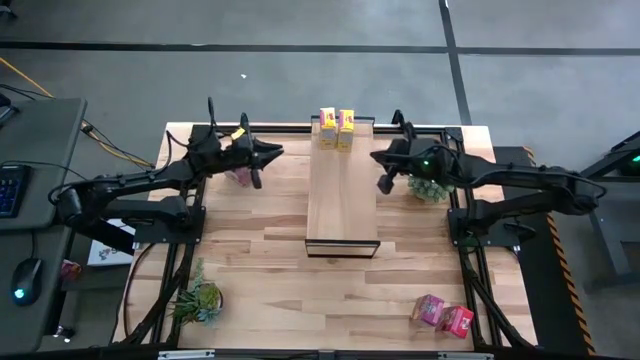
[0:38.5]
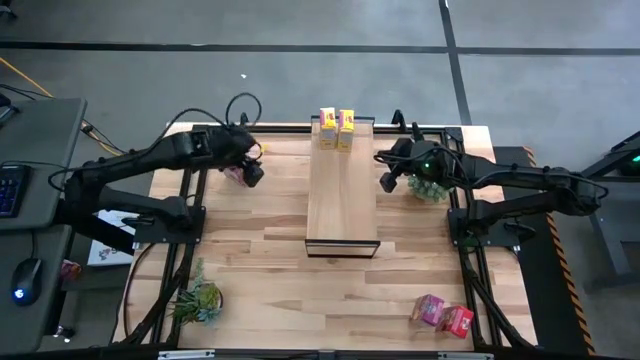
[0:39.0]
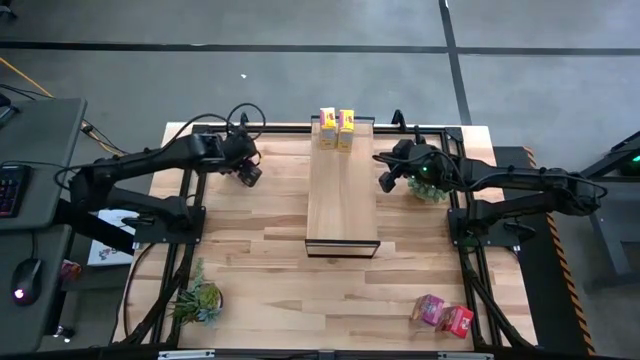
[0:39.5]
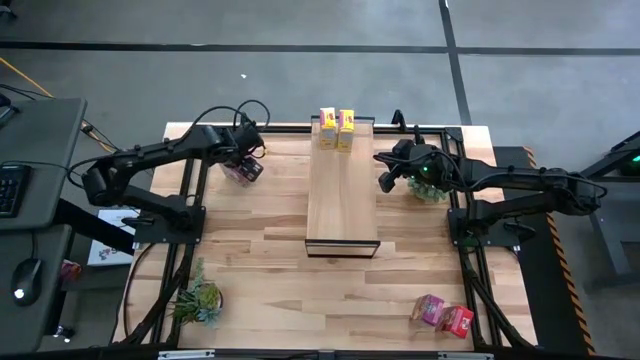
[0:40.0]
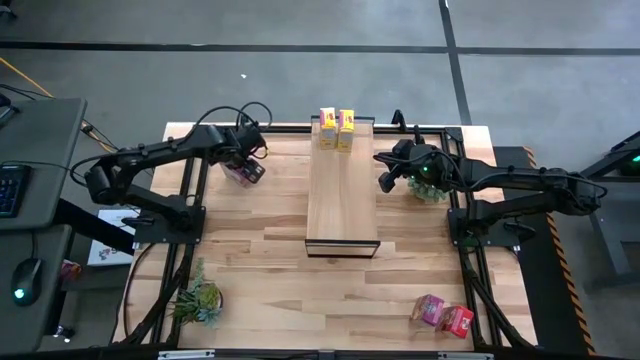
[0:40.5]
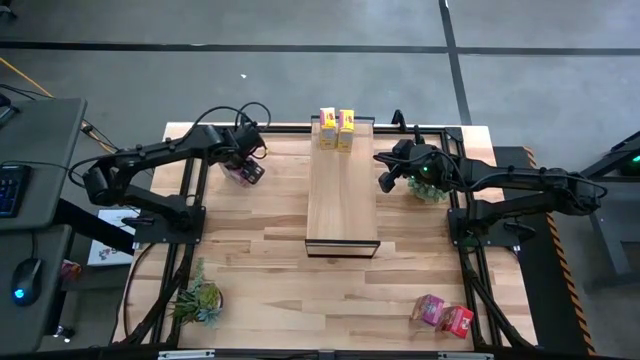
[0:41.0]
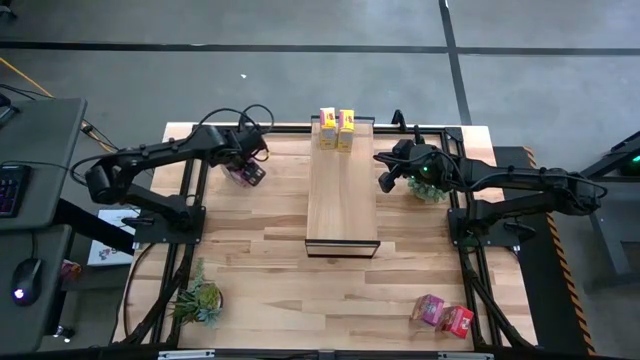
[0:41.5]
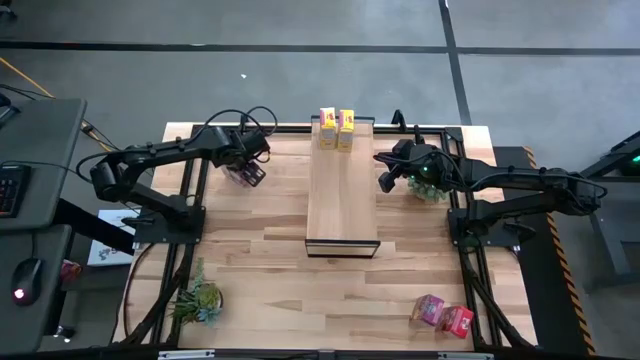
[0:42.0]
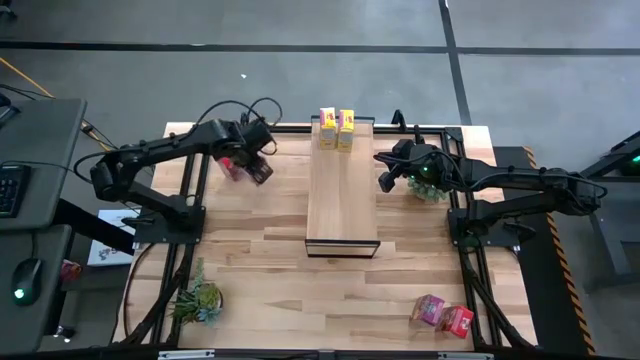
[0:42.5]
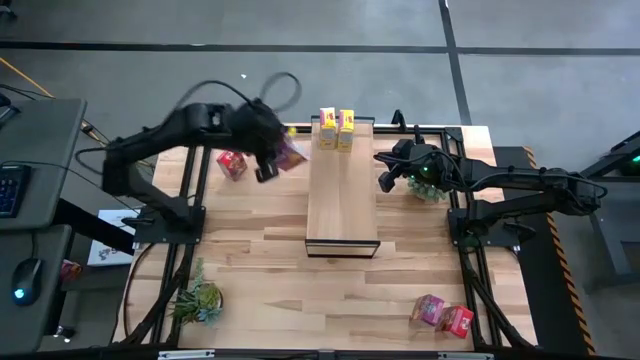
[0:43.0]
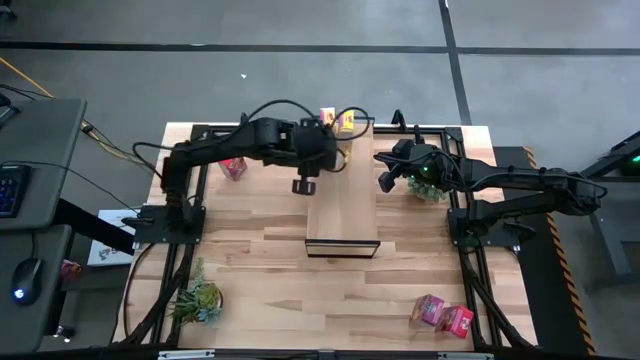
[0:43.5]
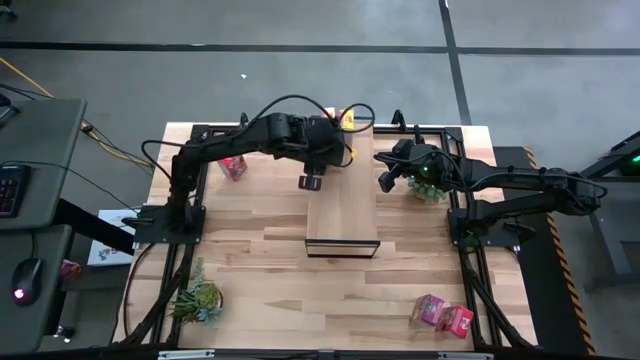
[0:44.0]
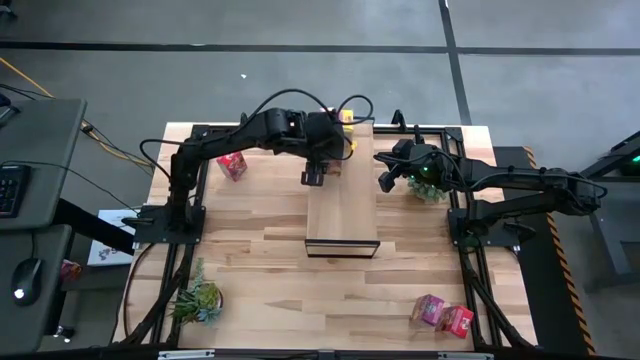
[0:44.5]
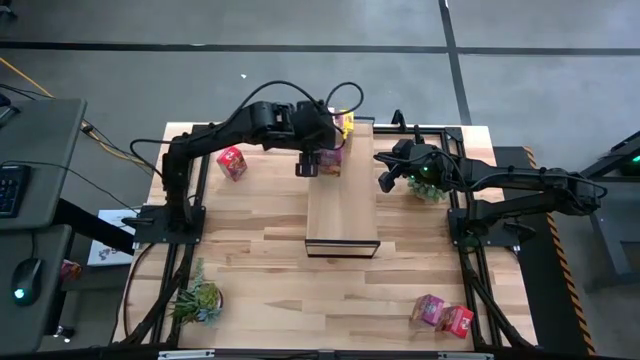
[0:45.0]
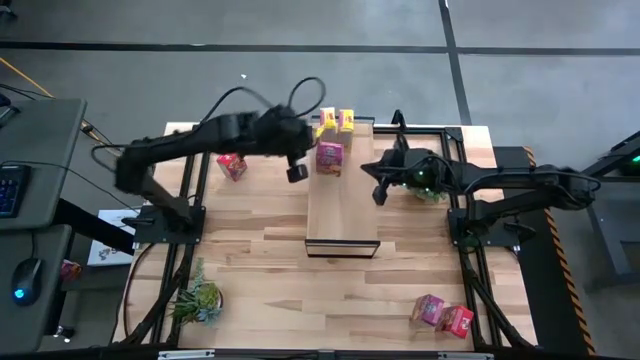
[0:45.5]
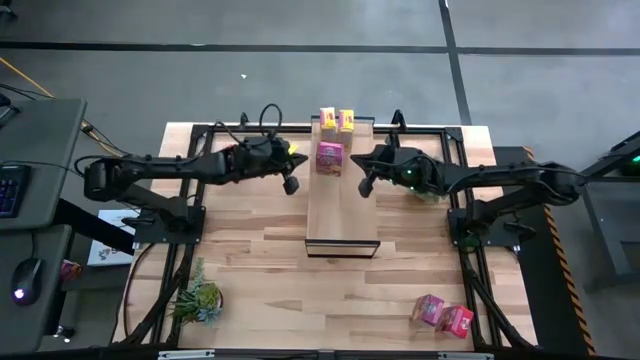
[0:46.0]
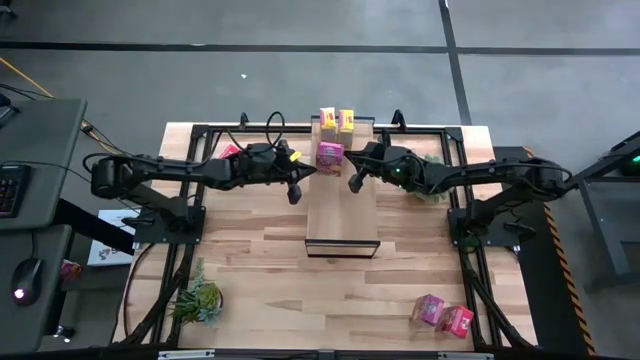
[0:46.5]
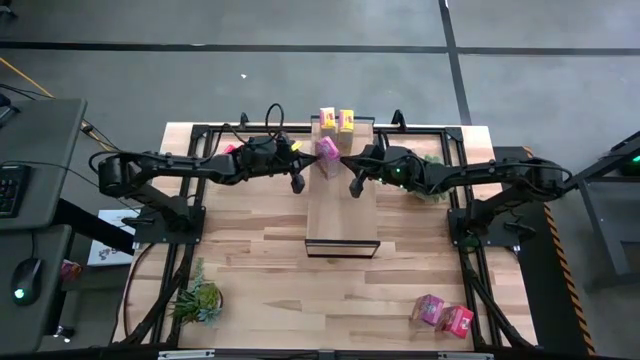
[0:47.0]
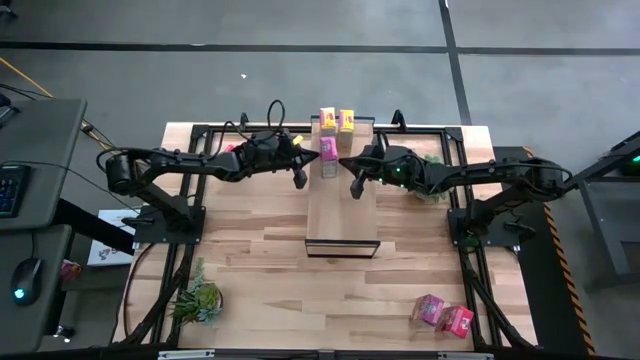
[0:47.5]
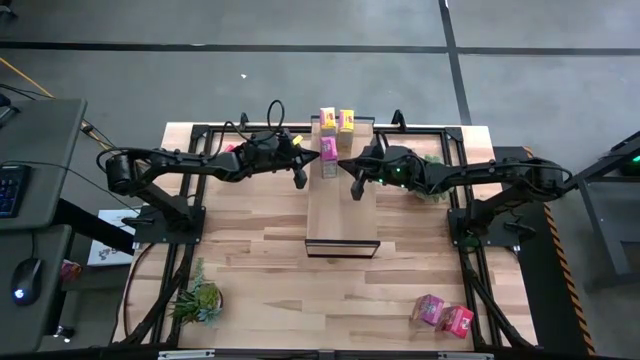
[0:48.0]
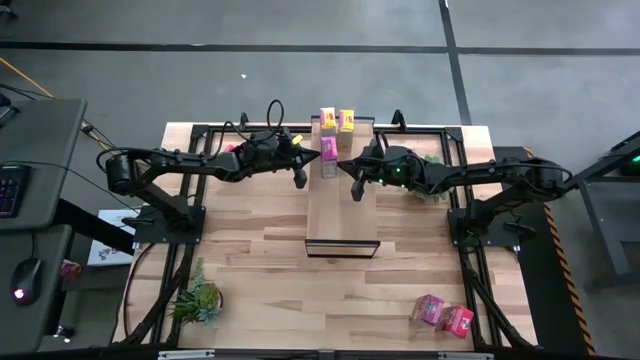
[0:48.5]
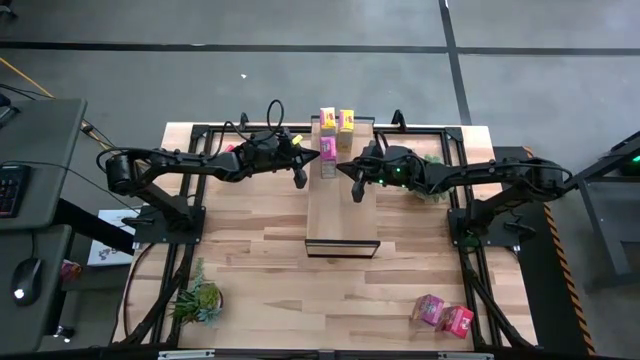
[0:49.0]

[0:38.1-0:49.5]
Task: Stack cereal on shelf
Put the top purple cereal box on the shelf

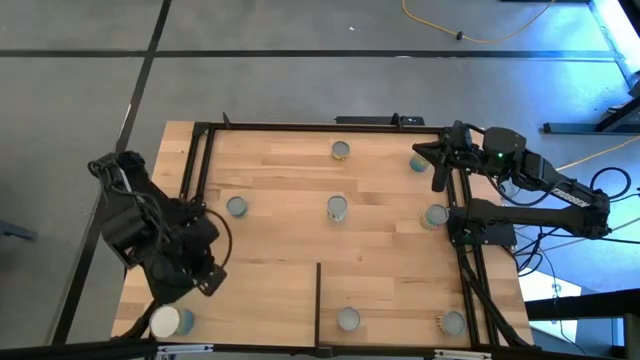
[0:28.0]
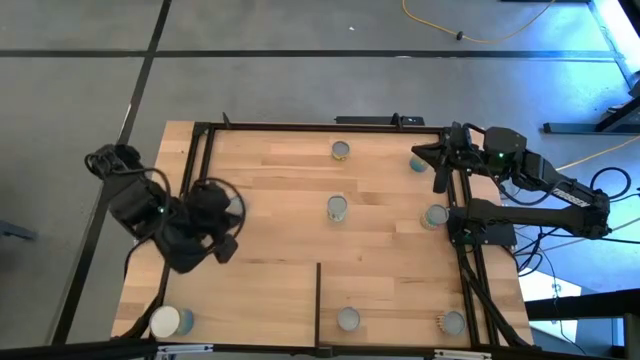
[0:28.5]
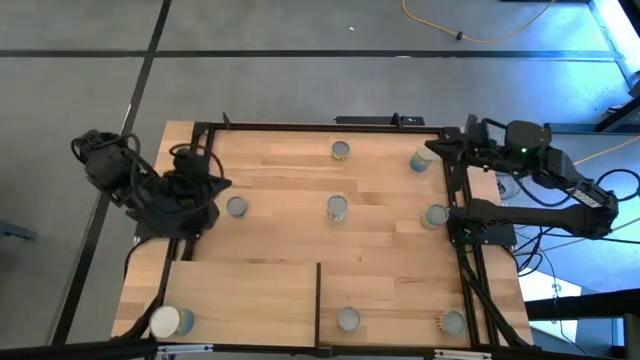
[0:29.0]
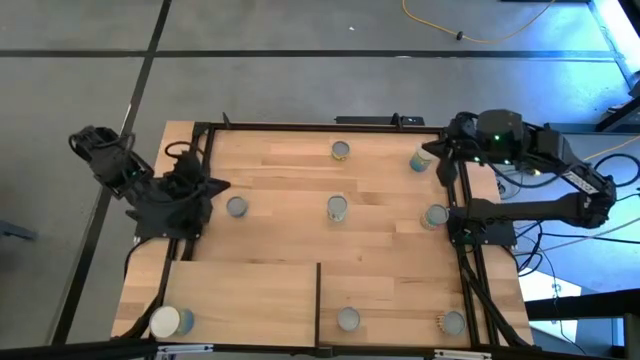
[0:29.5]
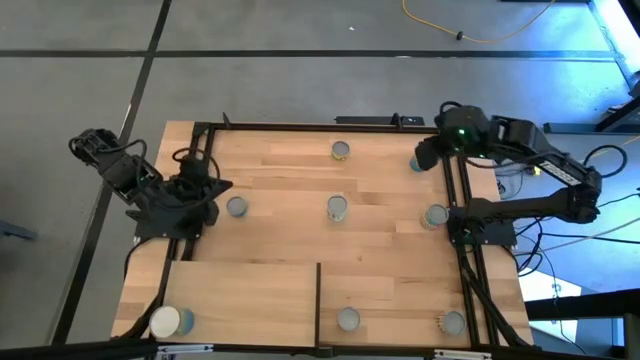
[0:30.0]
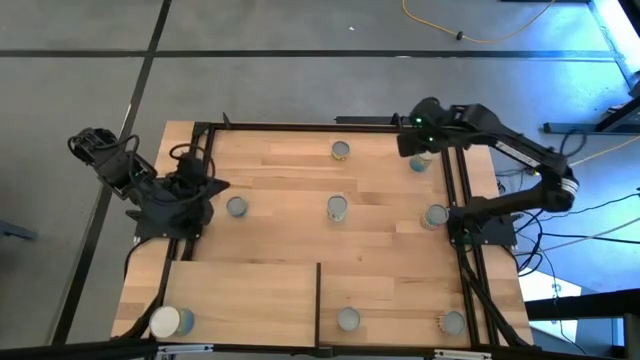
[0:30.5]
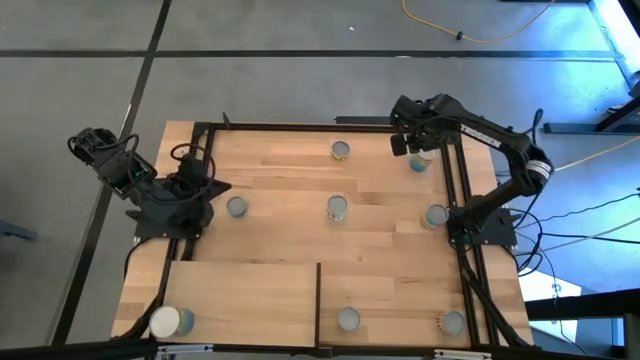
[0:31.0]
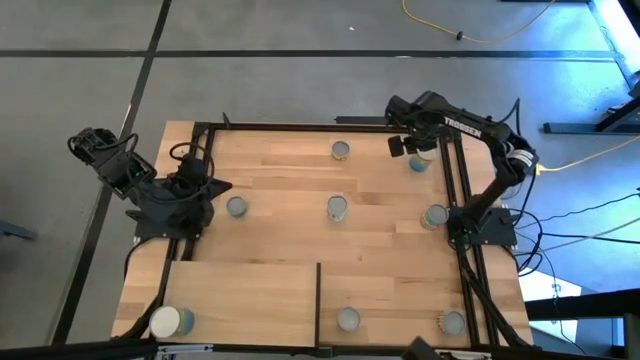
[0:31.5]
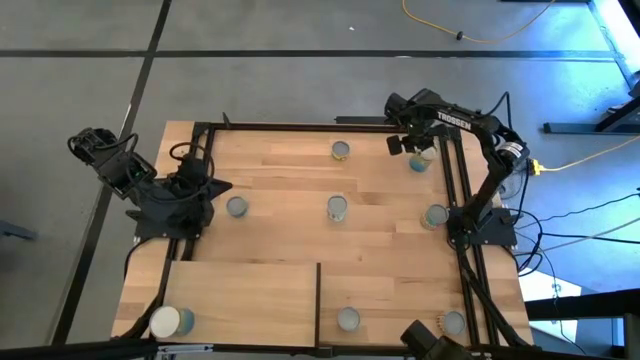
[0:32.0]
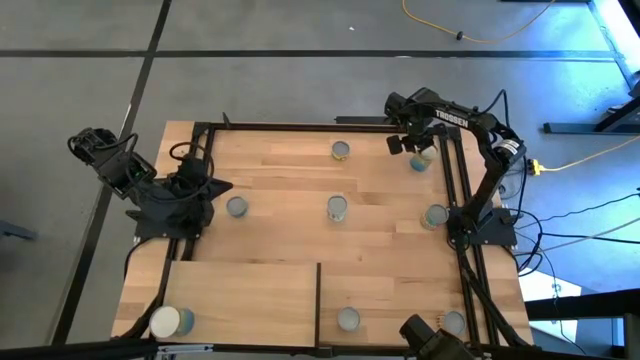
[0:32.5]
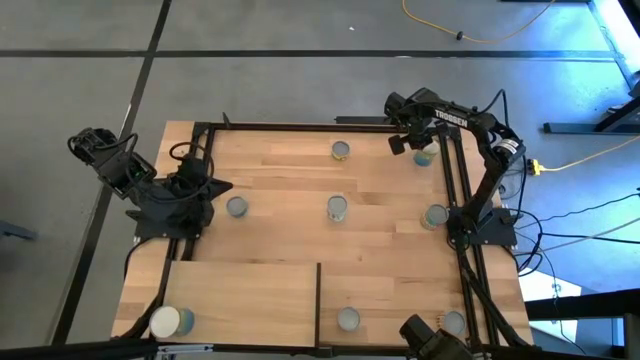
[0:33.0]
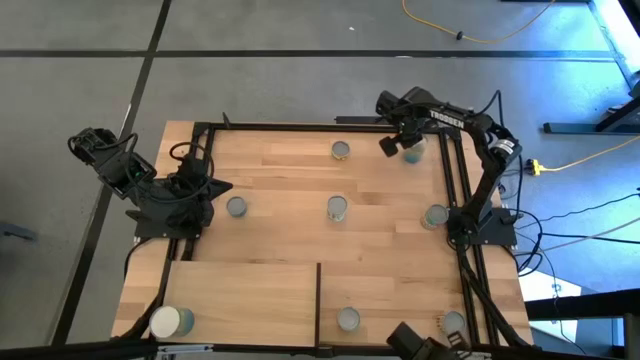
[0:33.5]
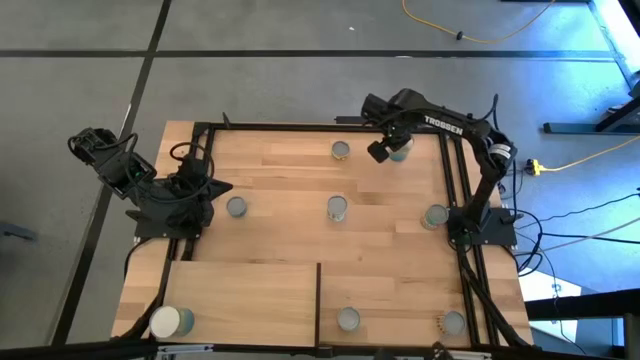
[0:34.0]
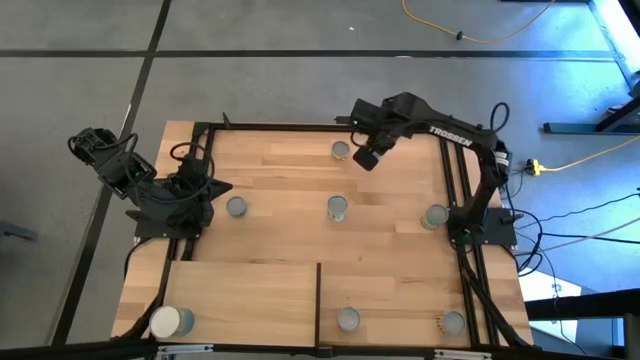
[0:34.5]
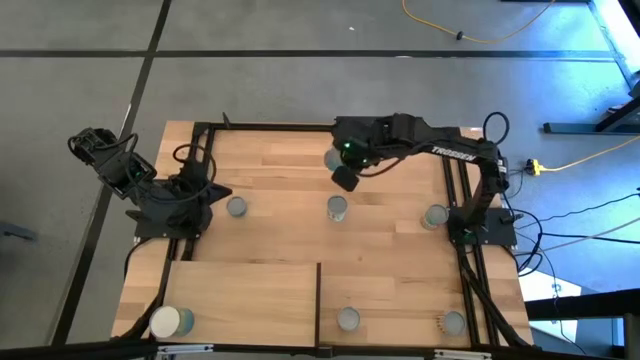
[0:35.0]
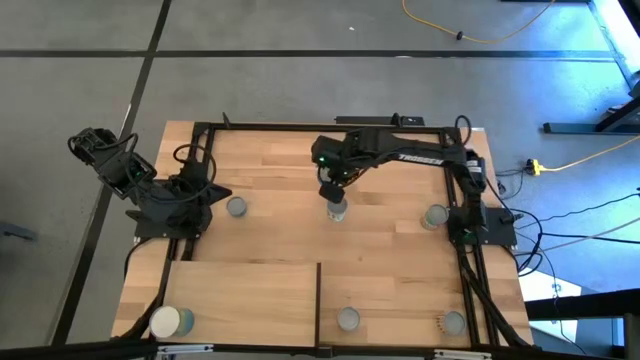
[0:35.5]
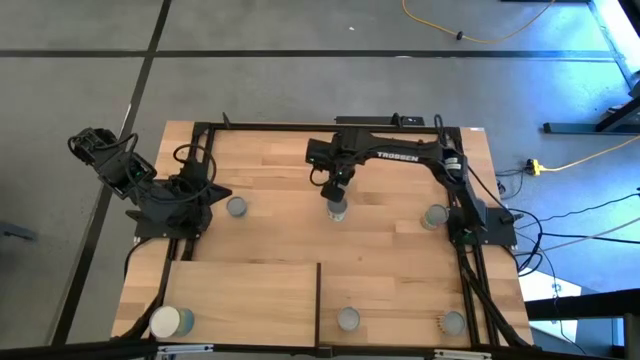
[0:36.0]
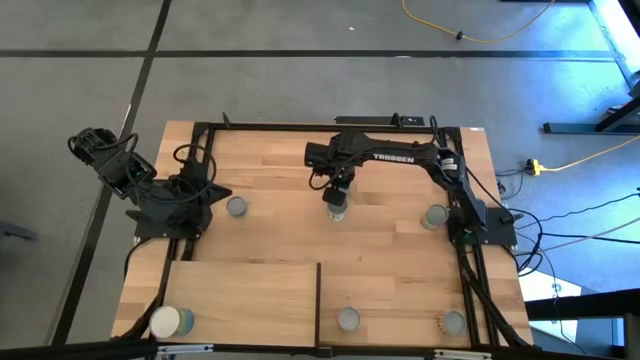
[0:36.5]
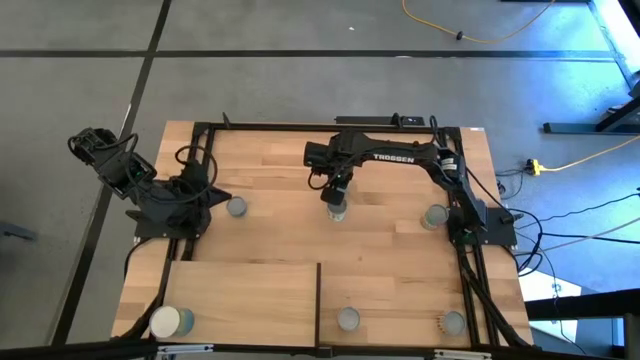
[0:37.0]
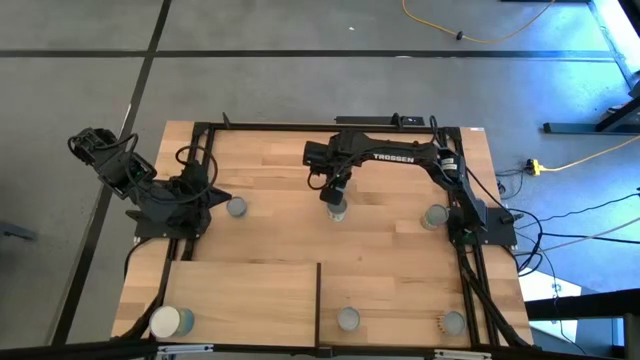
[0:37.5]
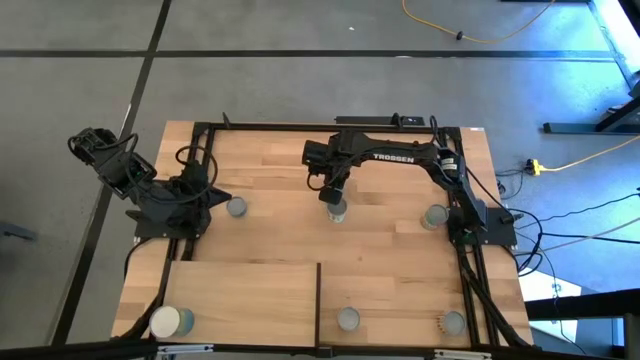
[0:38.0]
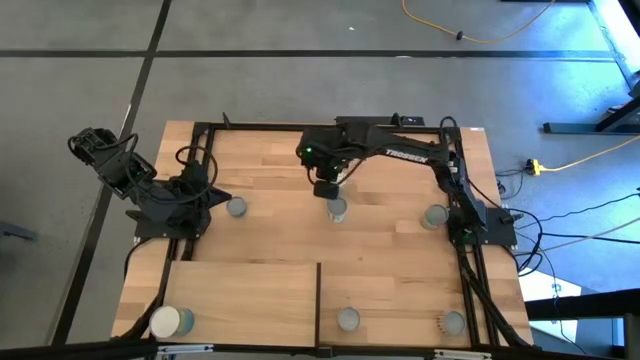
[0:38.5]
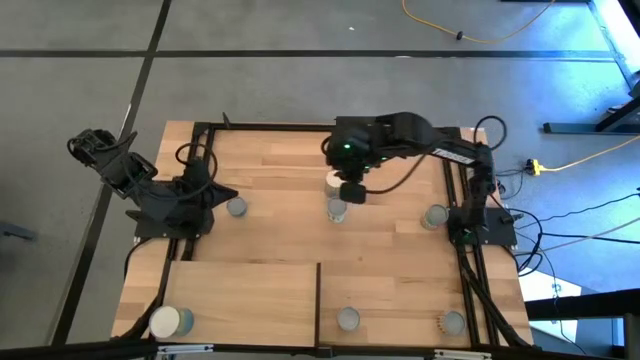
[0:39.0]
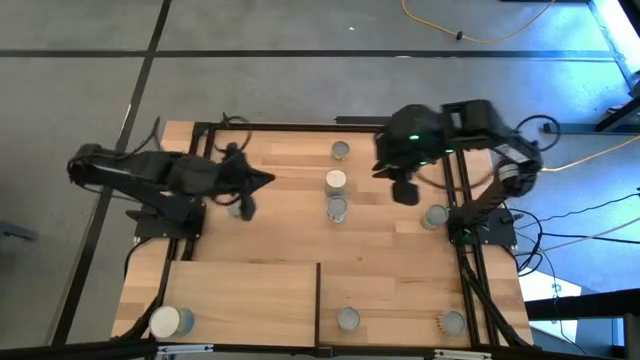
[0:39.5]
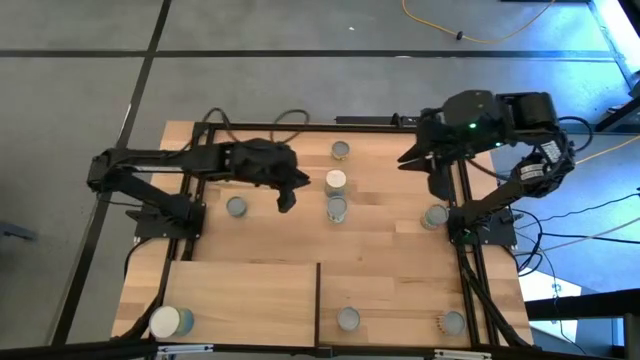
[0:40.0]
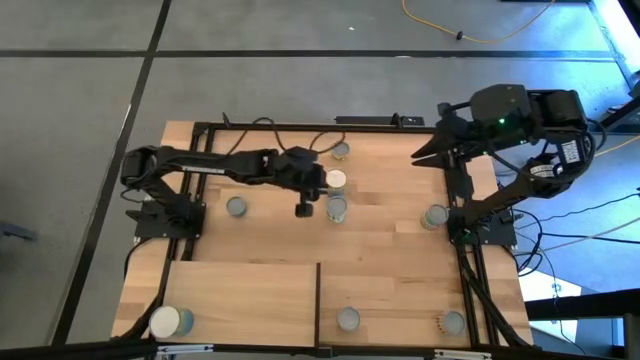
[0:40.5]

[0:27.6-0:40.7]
Task: Pick and place cans onto a shelf
Put the canned cherries on the shelf
